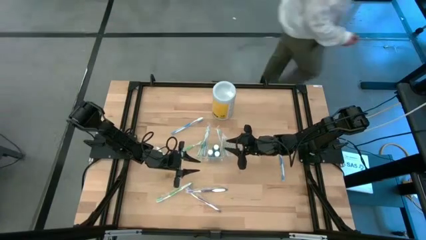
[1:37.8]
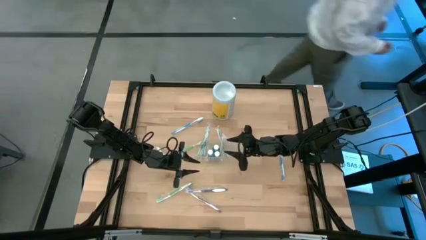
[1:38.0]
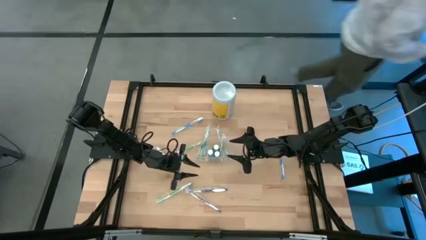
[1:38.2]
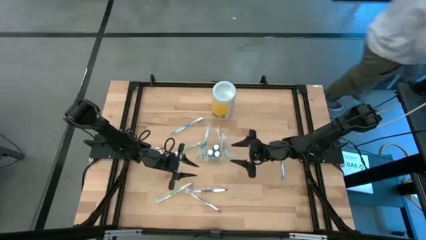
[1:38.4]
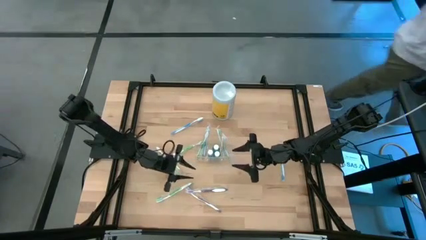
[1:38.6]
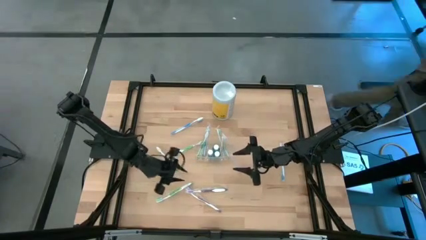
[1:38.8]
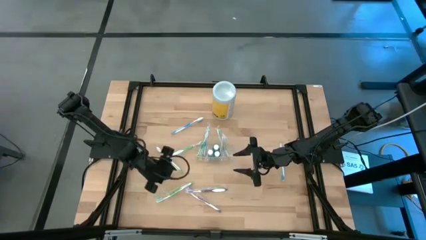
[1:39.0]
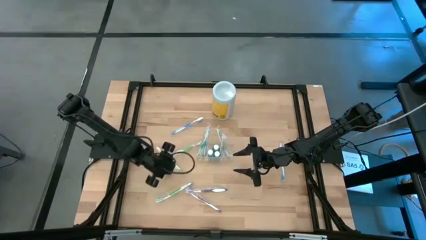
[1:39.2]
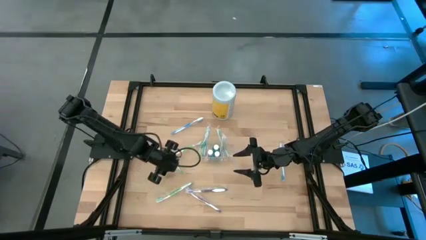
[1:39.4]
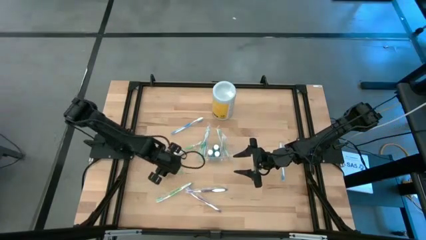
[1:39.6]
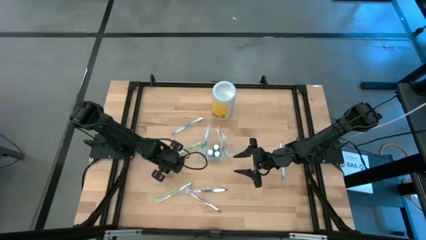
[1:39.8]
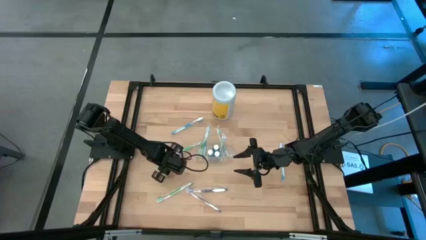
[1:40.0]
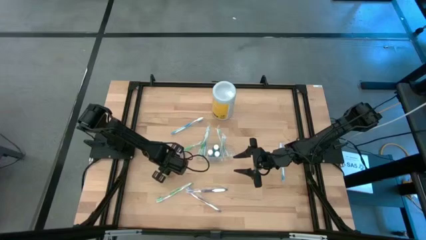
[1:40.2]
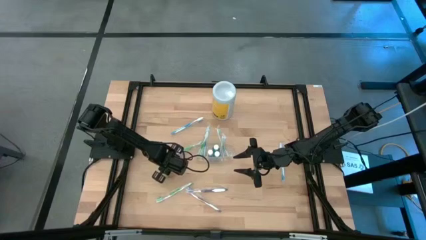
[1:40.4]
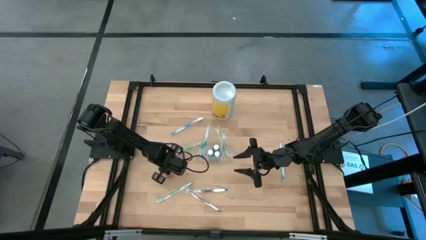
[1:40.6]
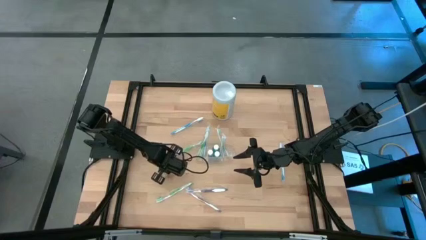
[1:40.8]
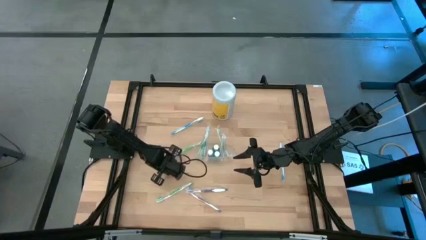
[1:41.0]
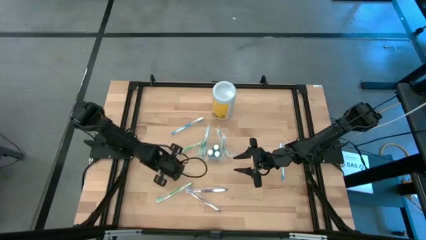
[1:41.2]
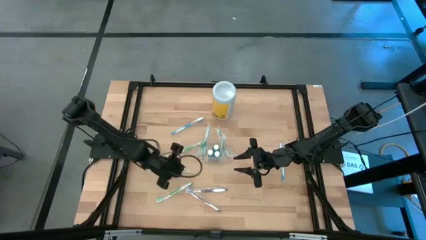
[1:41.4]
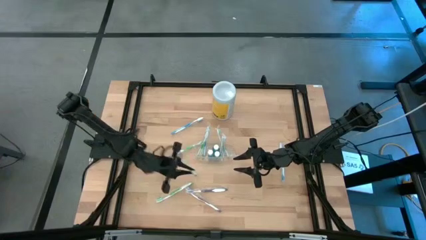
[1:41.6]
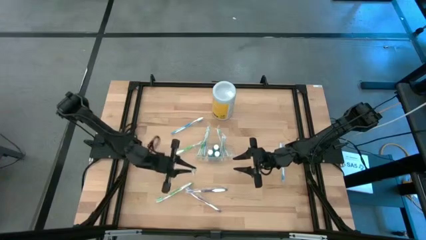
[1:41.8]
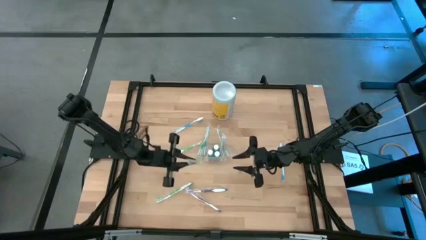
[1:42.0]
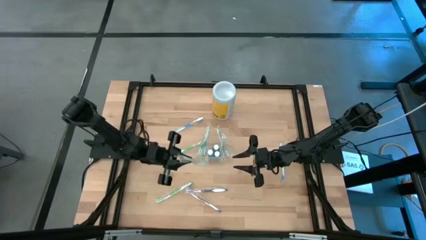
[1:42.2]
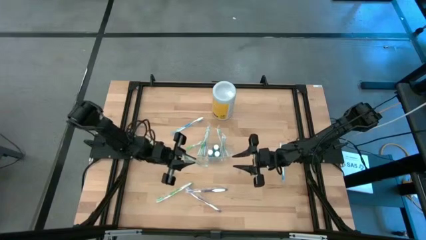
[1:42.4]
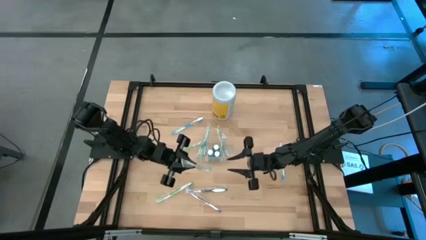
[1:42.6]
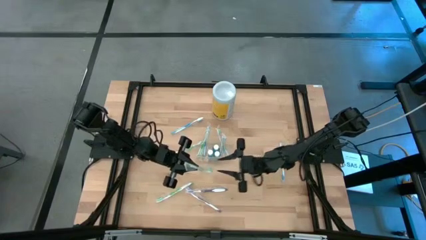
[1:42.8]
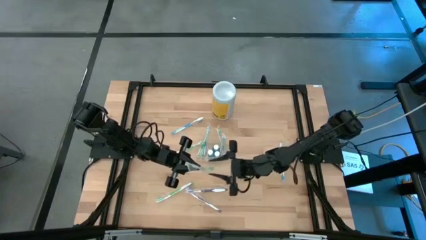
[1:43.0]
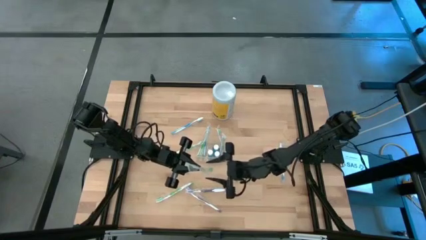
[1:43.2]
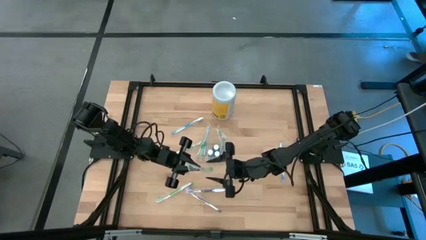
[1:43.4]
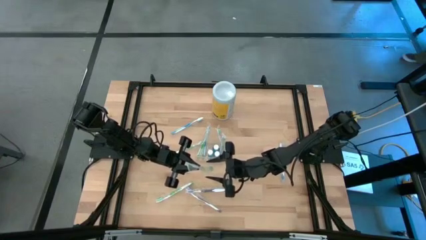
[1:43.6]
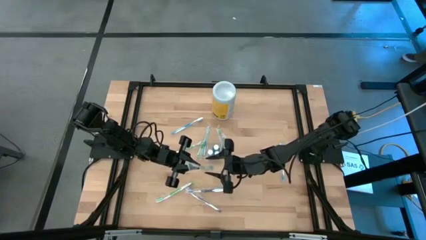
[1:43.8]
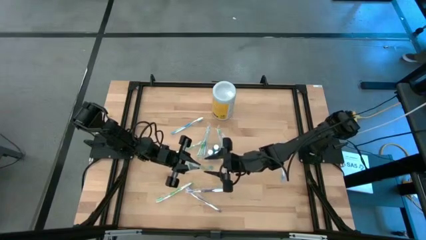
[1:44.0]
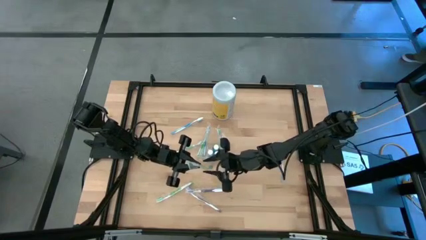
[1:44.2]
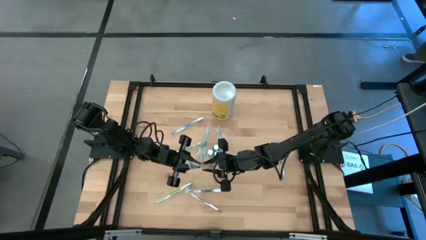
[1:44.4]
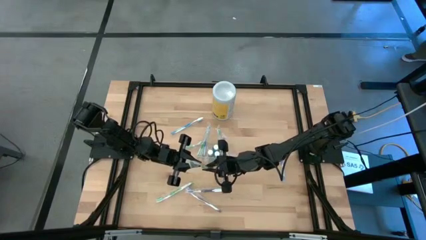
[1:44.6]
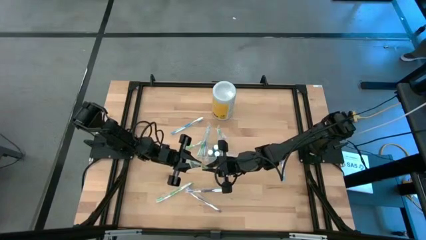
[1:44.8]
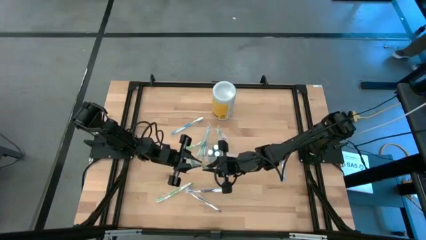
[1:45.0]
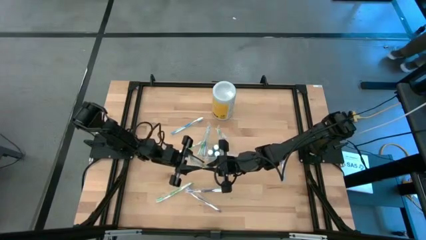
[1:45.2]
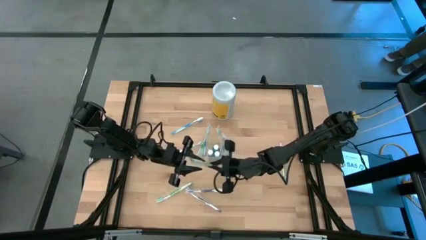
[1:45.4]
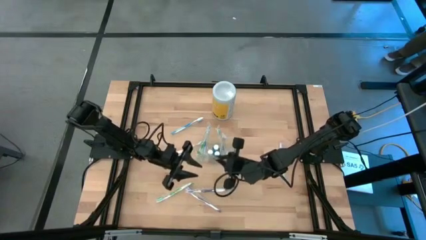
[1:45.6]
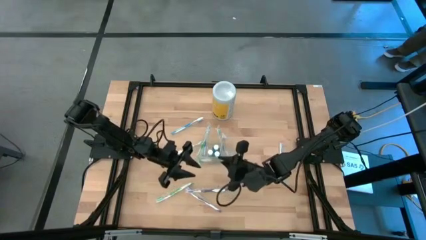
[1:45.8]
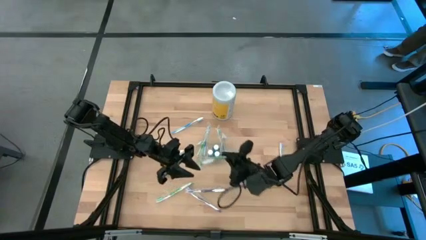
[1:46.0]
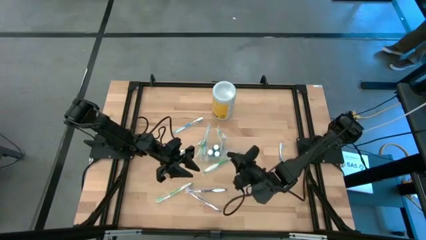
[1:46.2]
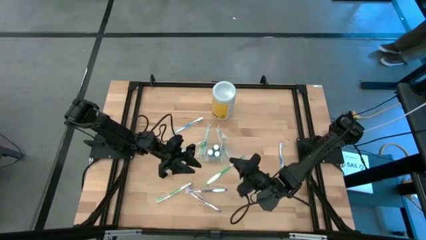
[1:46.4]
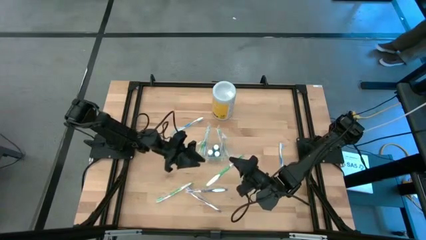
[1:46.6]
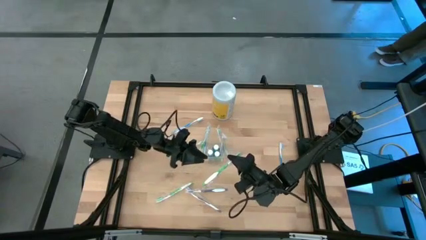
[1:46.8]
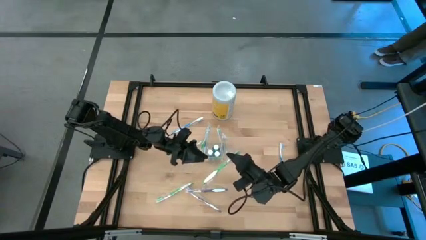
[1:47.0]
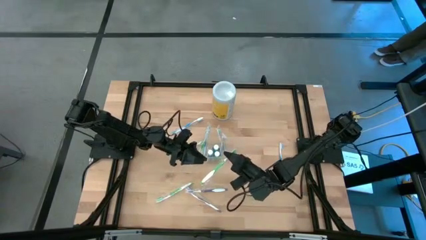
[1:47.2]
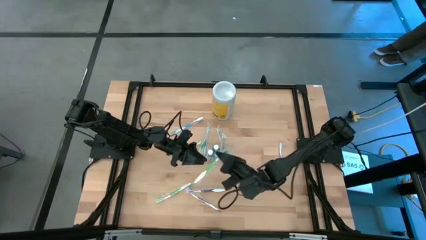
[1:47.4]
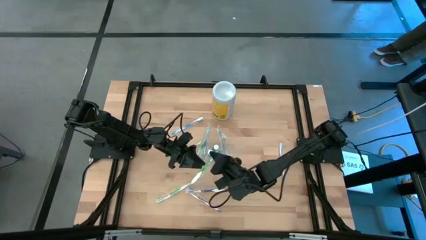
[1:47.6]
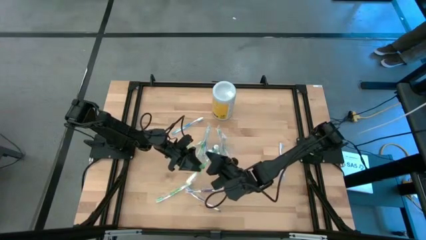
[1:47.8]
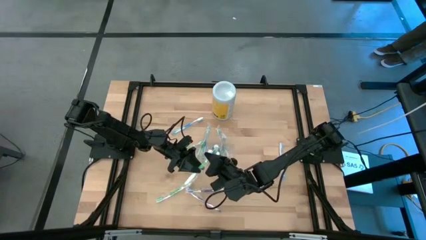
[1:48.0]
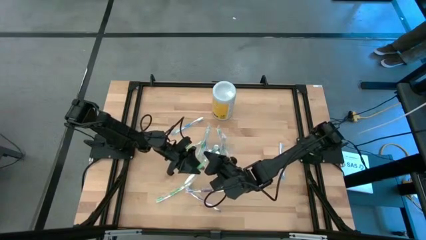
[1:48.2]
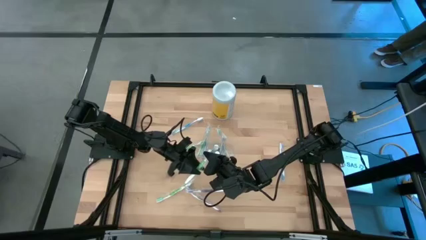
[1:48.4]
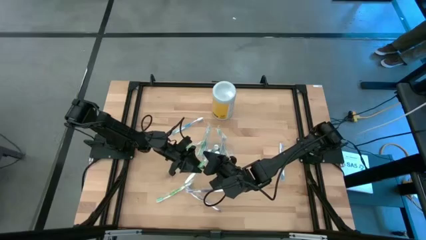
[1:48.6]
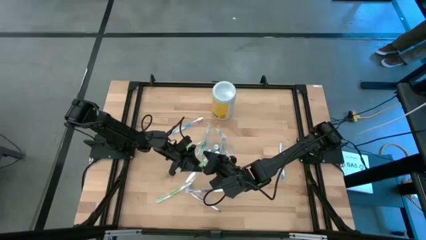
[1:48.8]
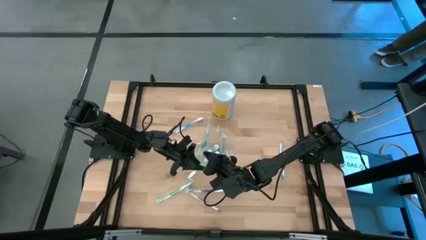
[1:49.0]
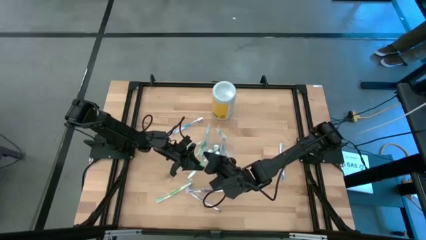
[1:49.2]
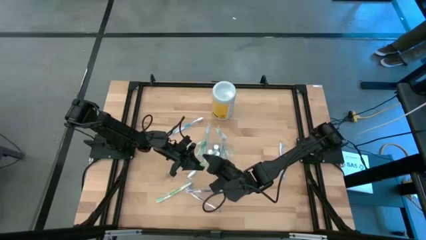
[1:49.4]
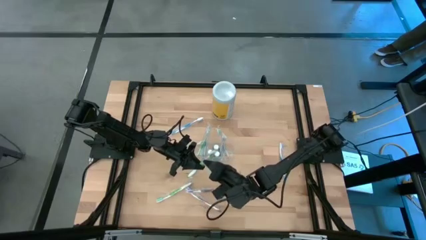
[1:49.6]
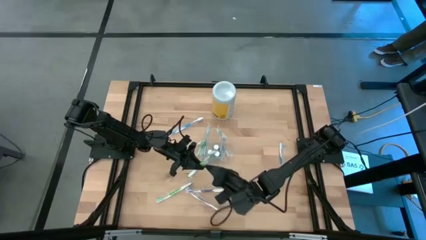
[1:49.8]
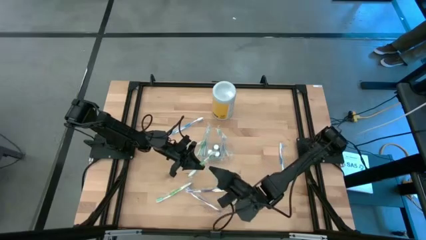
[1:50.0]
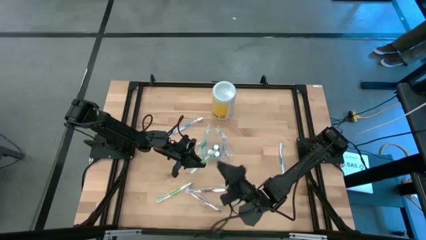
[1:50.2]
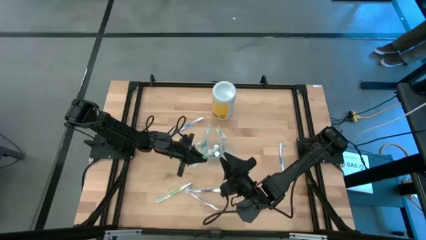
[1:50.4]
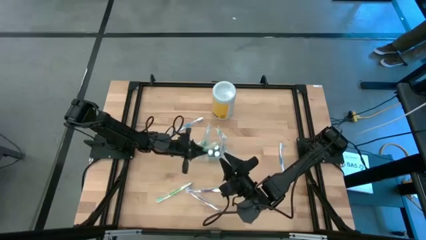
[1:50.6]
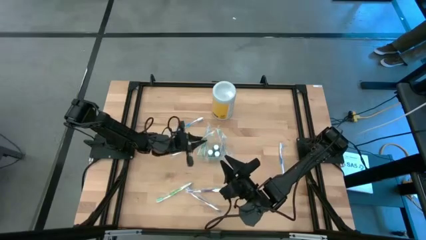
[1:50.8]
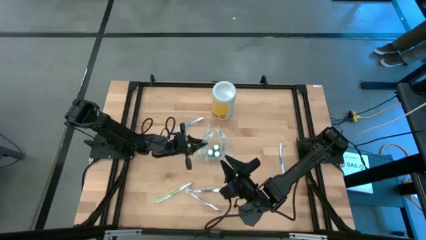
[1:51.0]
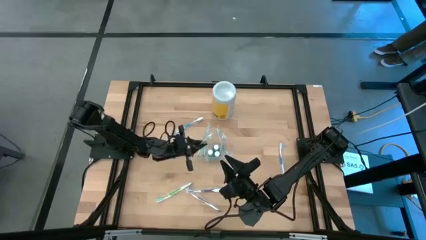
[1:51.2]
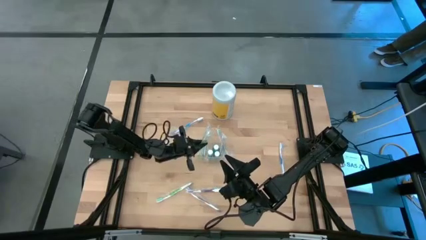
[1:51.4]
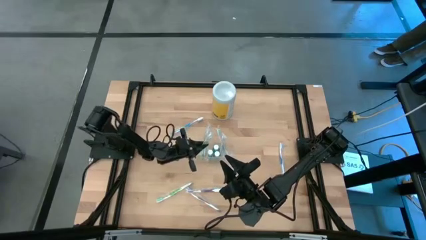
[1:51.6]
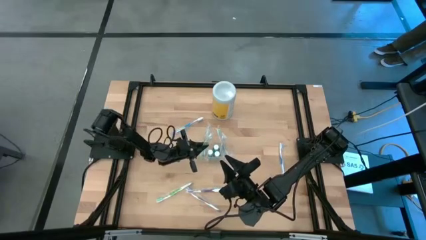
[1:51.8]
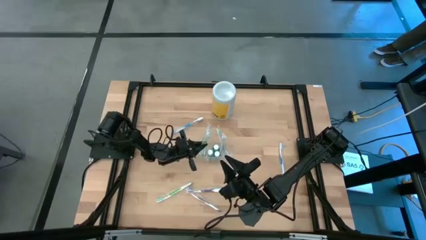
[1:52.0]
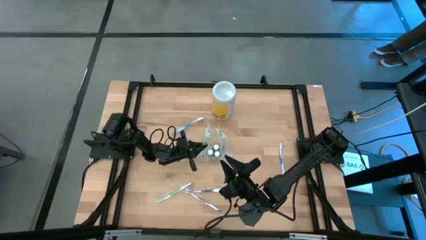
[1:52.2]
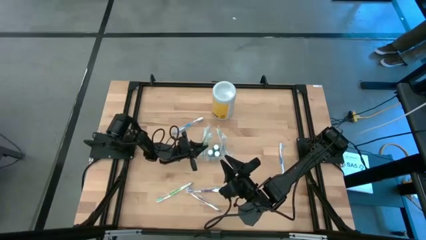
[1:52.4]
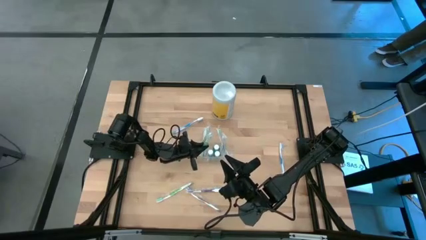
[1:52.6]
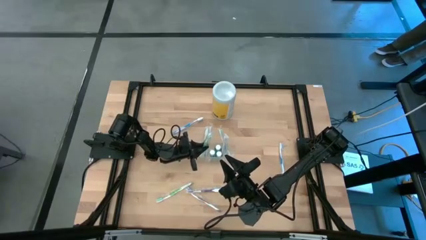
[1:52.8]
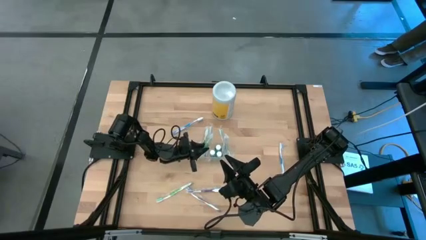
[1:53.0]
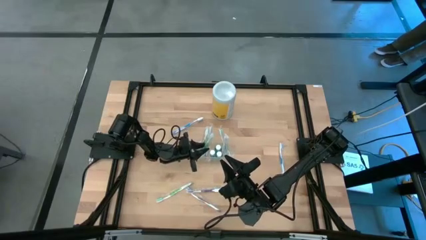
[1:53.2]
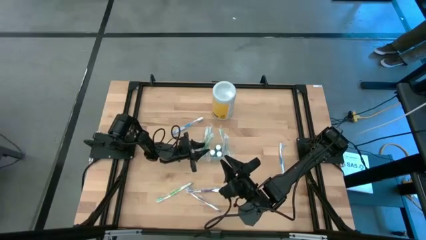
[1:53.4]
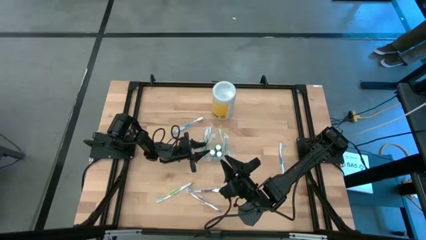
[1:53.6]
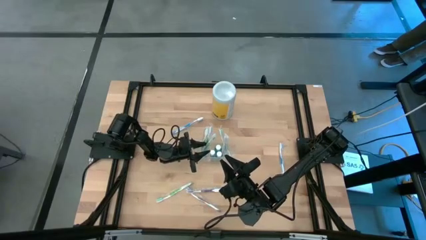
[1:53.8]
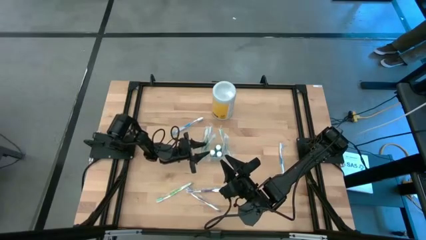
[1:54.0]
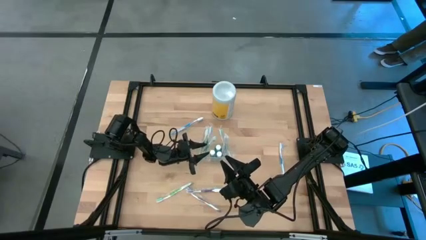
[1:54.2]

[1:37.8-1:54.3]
Task: Pick & Place toothbrushing station
Put the green toothbrush into the transparent organizer
